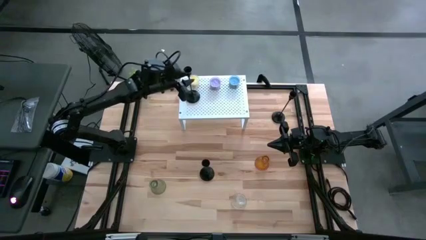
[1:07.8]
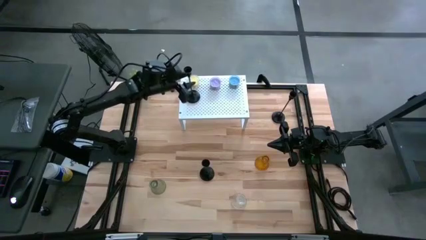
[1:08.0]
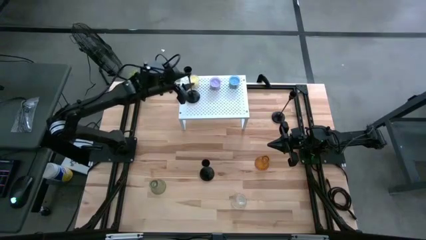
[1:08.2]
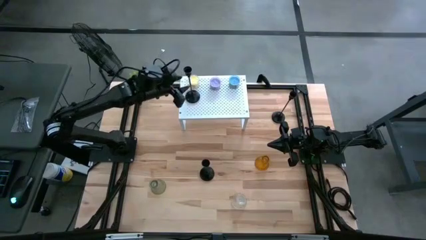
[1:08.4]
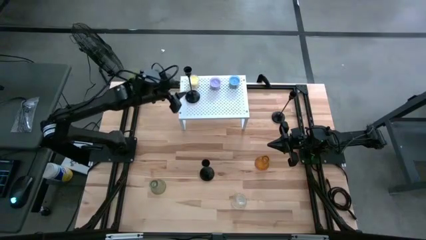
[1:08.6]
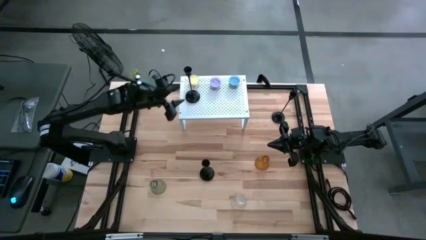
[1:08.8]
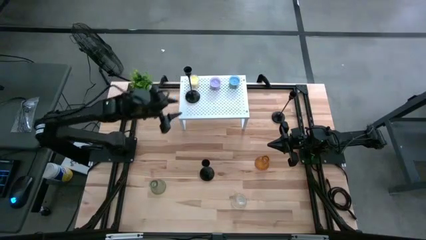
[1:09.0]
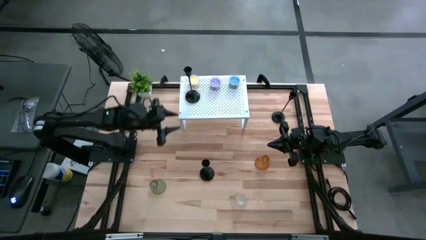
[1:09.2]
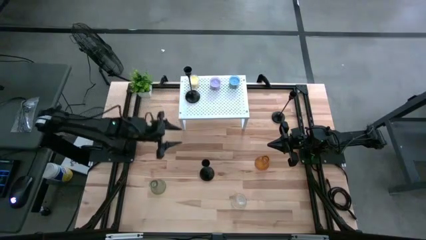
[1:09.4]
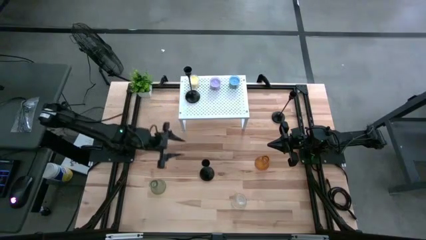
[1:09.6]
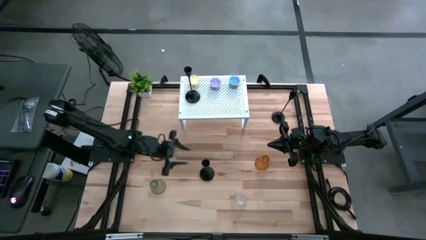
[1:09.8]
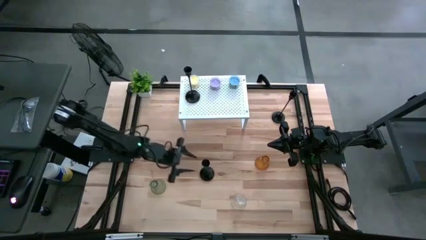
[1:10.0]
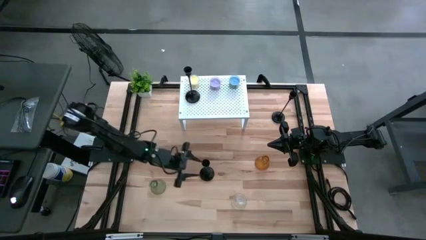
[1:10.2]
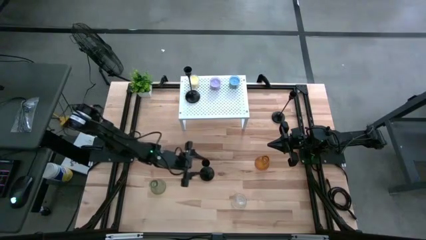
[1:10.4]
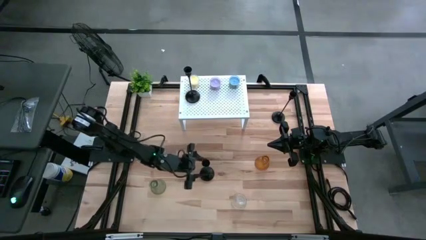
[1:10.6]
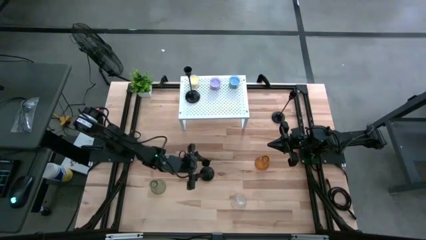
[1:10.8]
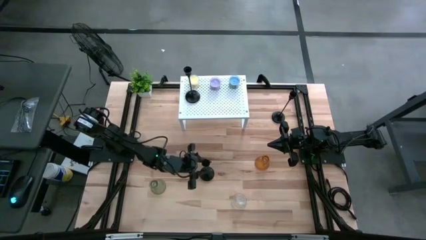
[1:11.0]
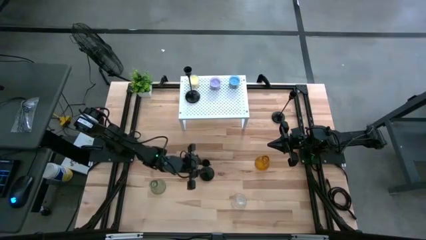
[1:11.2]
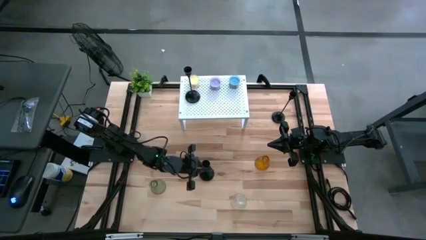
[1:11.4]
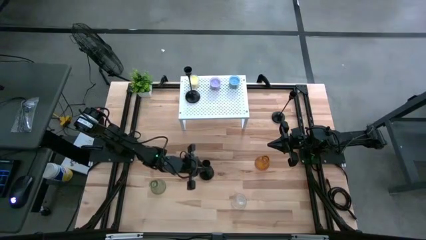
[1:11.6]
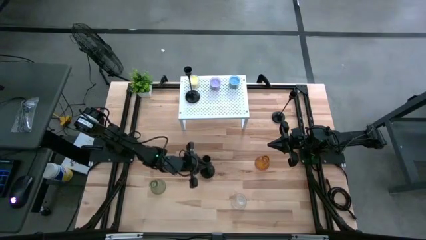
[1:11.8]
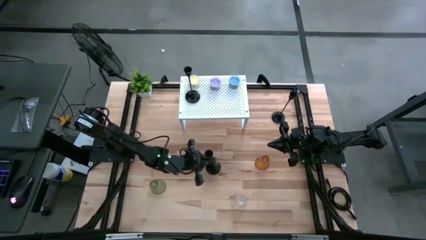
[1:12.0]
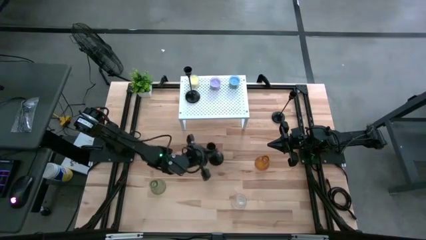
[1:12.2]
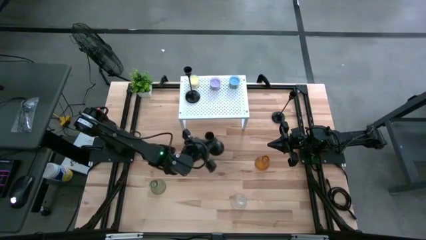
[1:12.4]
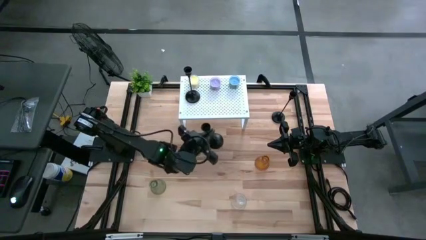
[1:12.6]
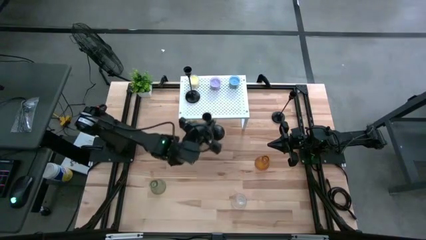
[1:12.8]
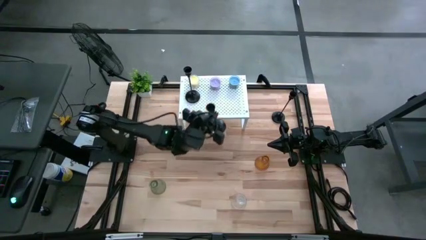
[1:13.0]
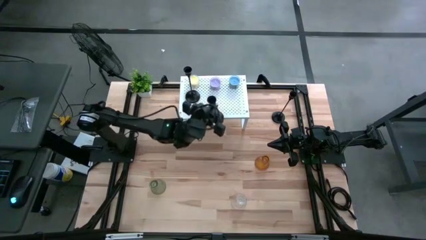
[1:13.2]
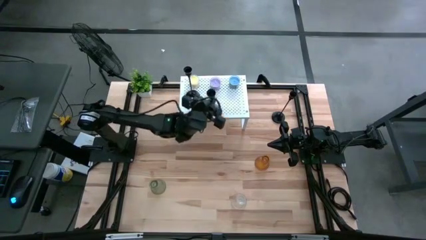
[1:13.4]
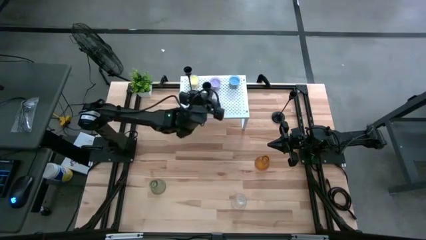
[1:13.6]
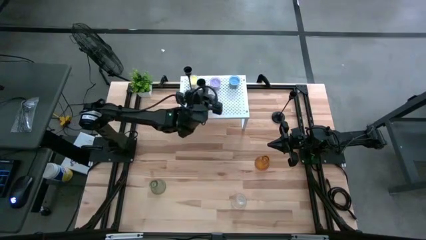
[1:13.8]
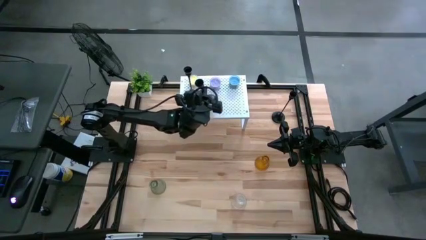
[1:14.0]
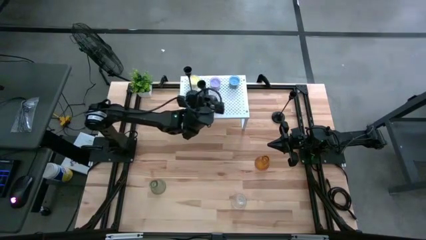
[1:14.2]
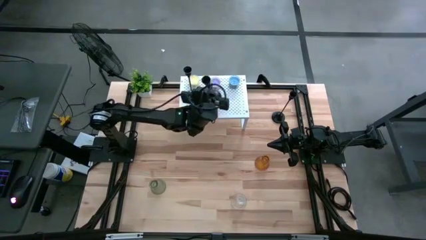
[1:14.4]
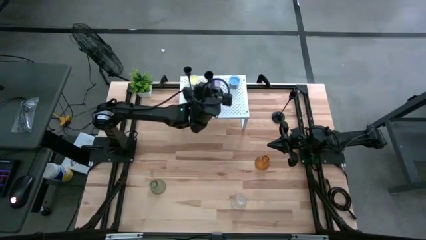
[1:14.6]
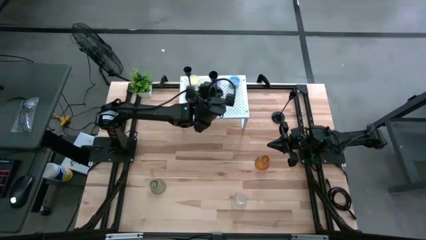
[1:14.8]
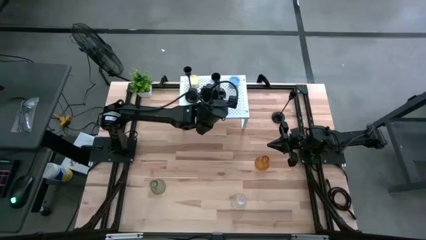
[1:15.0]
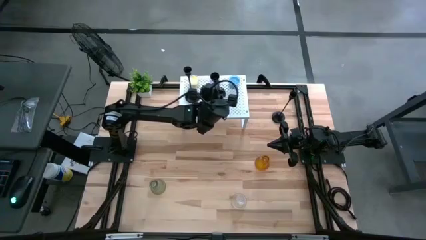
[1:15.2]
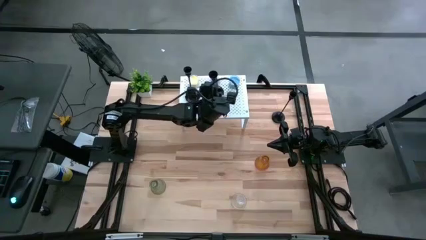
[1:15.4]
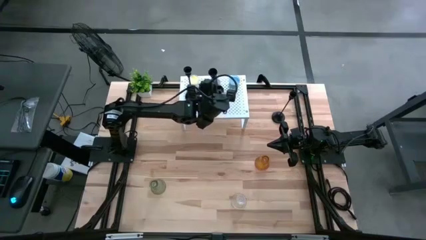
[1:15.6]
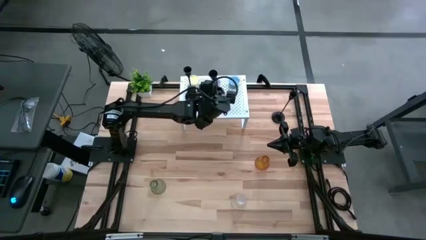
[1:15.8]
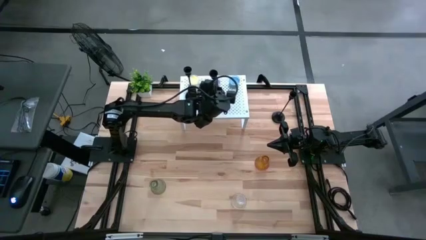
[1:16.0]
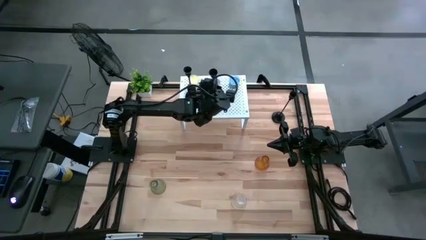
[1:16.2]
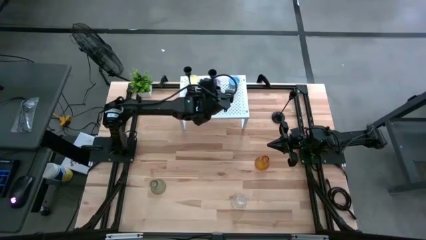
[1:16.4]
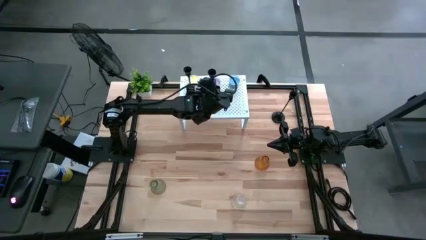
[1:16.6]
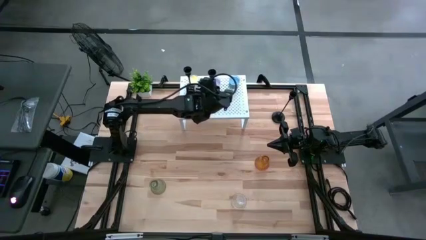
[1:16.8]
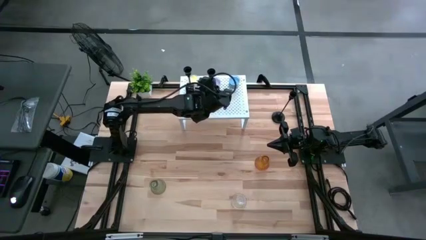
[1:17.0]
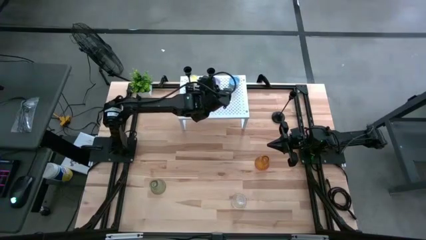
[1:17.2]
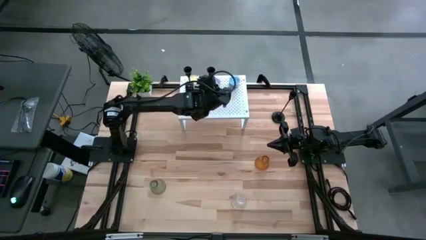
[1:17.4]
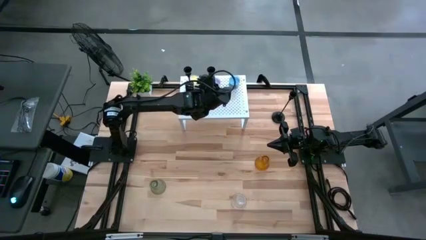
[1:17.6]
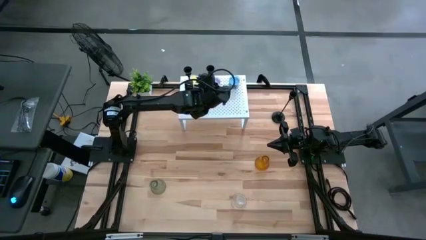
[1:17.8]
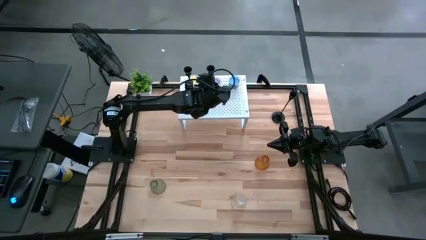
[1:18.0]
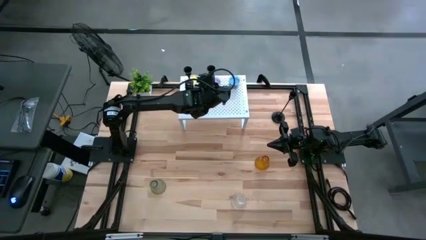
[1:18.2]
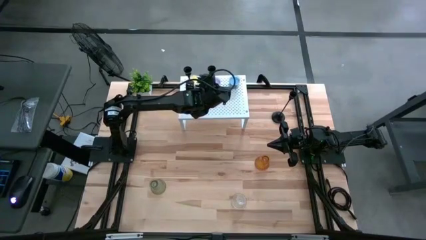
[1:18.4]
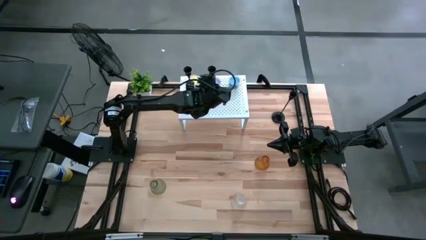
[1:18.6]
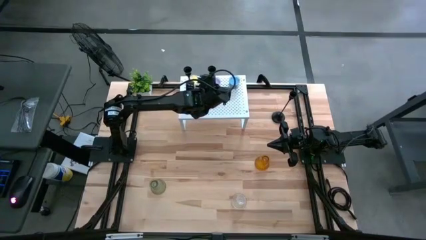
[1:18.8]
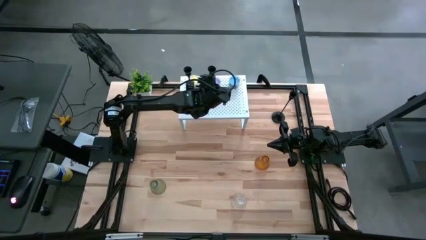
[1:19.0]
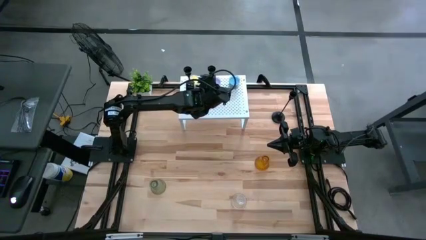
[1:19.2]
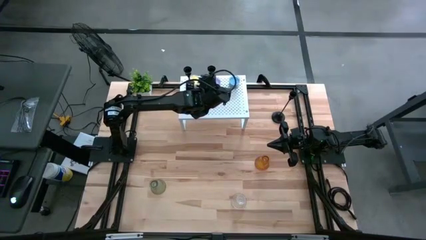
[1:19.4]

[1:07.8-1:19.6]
Task: Pick & Place candle stick holders
Put the bottom black candle holder on the shelf
